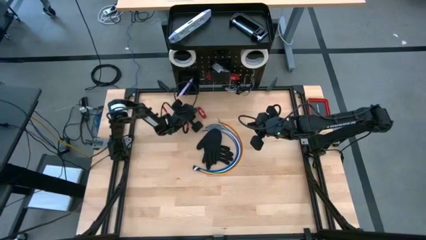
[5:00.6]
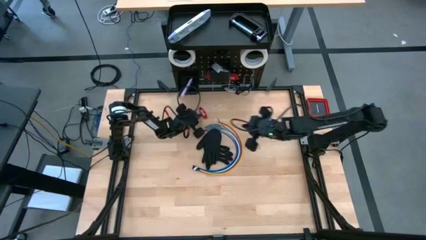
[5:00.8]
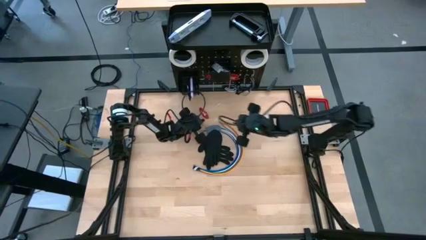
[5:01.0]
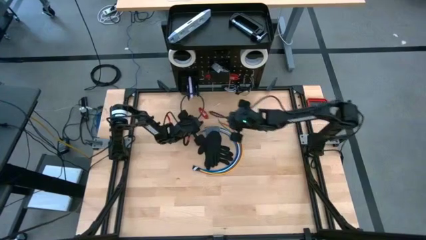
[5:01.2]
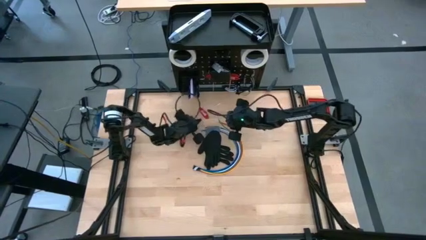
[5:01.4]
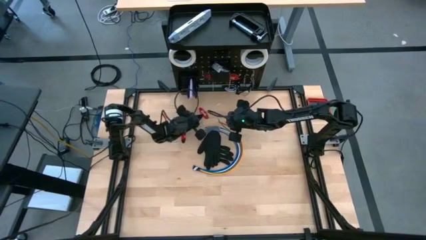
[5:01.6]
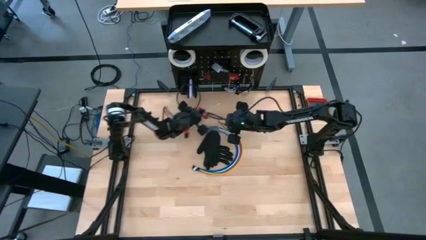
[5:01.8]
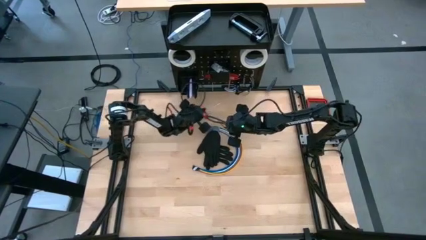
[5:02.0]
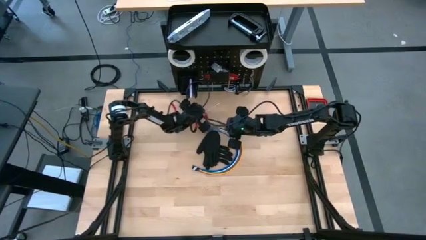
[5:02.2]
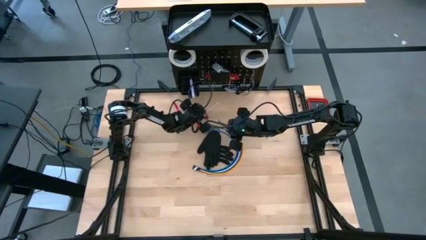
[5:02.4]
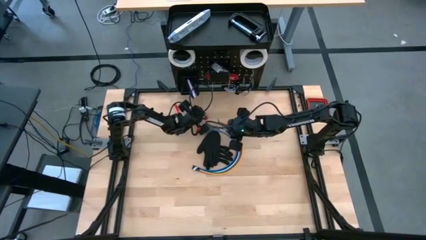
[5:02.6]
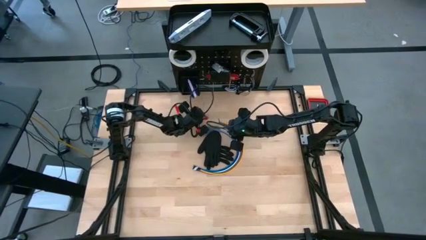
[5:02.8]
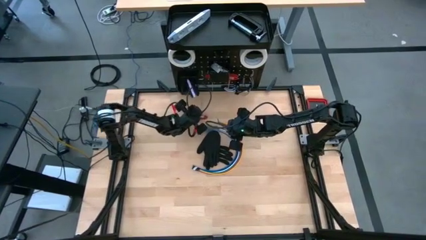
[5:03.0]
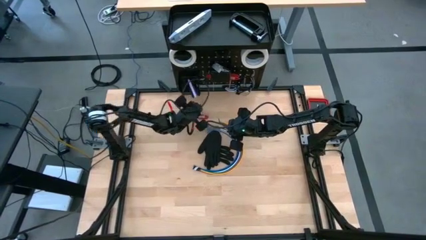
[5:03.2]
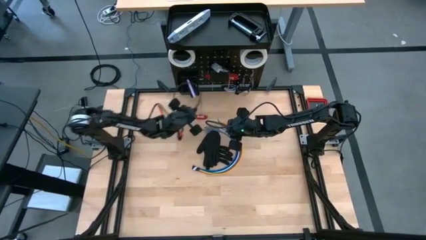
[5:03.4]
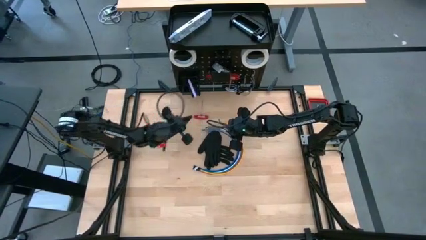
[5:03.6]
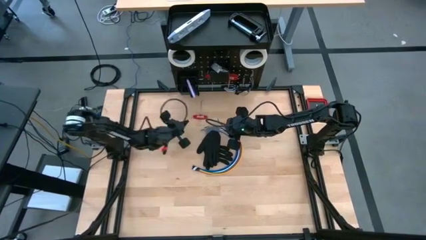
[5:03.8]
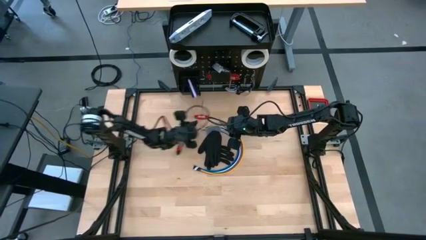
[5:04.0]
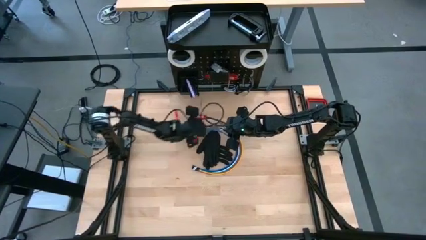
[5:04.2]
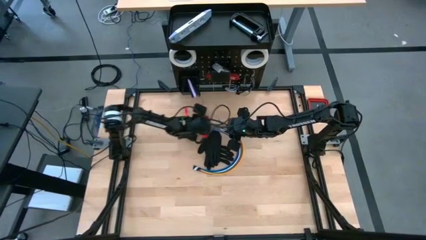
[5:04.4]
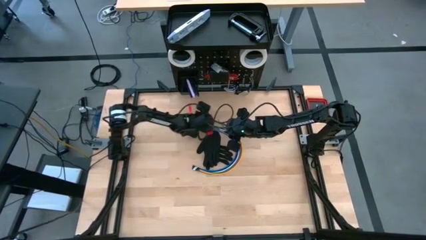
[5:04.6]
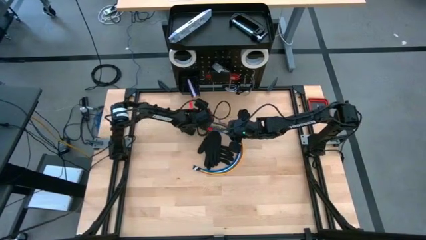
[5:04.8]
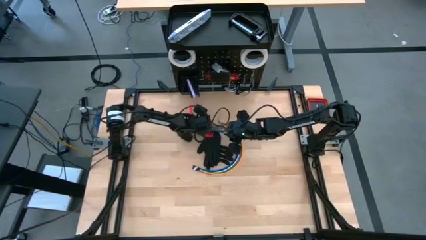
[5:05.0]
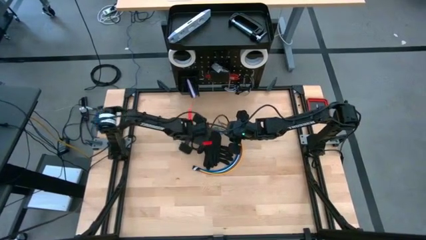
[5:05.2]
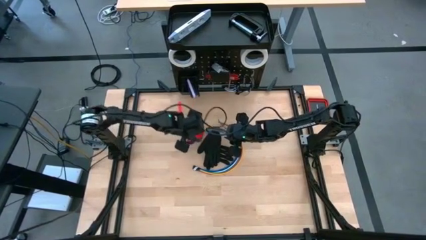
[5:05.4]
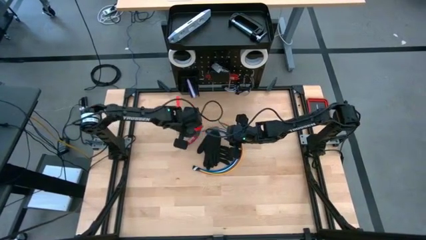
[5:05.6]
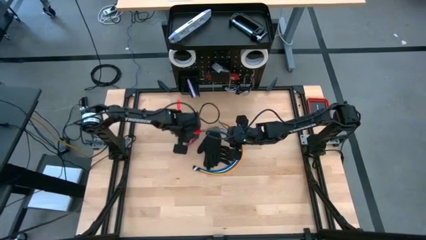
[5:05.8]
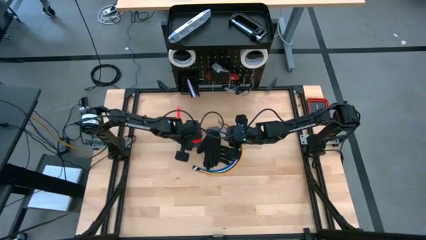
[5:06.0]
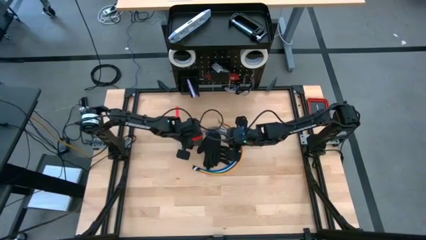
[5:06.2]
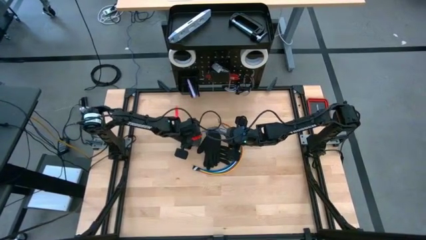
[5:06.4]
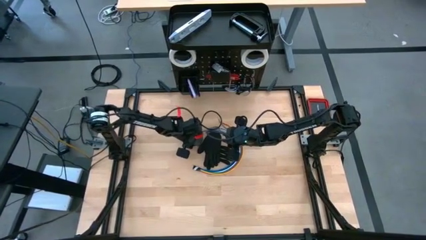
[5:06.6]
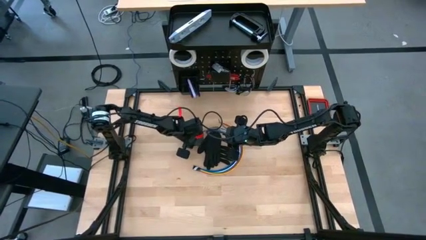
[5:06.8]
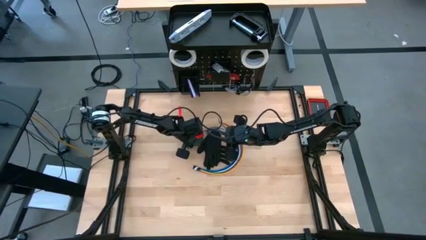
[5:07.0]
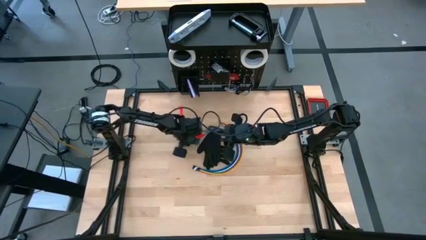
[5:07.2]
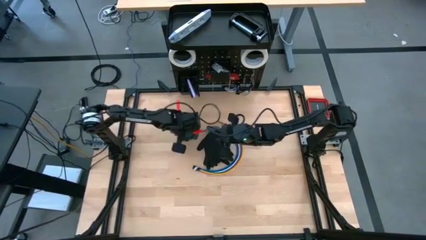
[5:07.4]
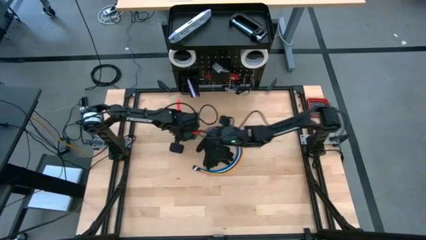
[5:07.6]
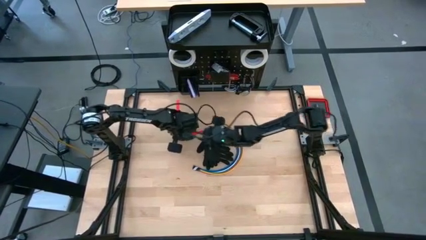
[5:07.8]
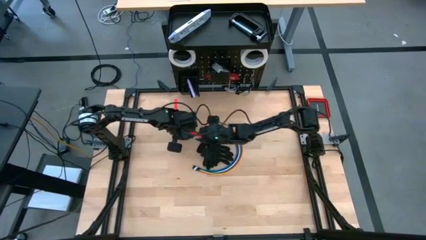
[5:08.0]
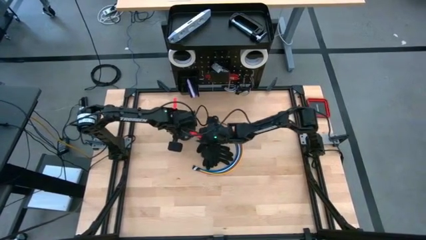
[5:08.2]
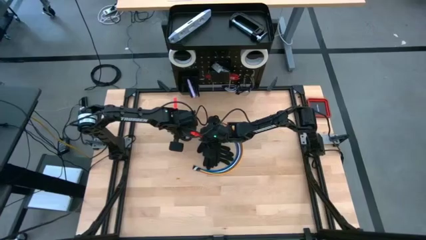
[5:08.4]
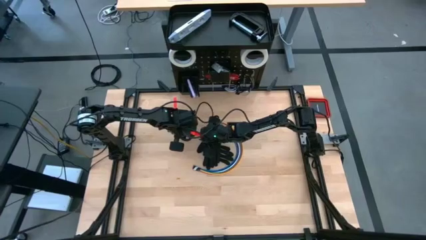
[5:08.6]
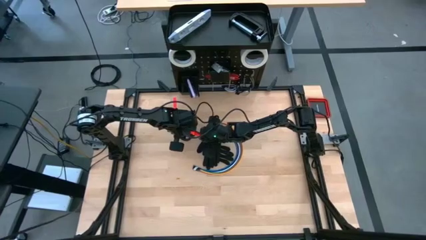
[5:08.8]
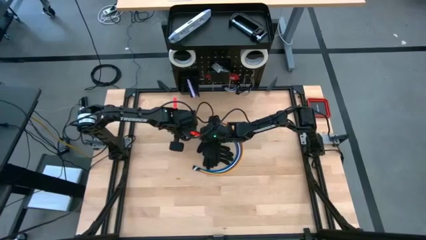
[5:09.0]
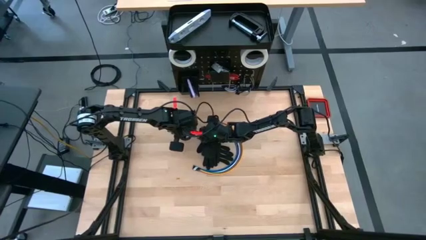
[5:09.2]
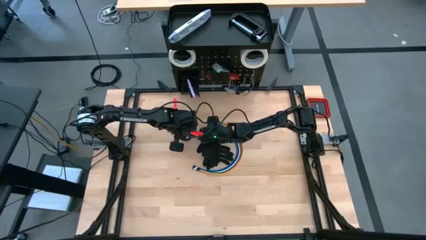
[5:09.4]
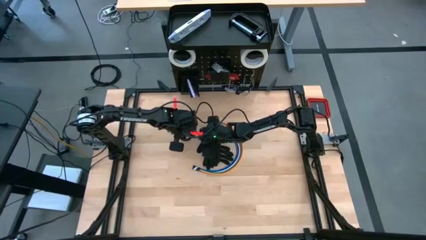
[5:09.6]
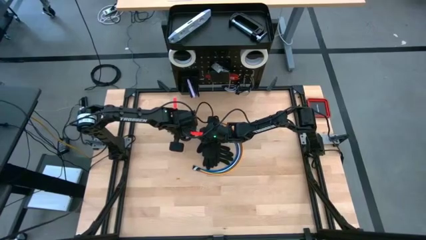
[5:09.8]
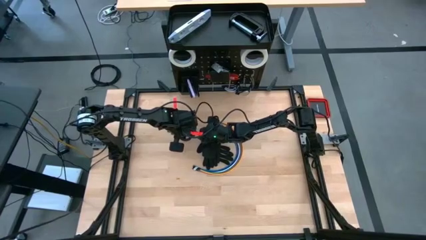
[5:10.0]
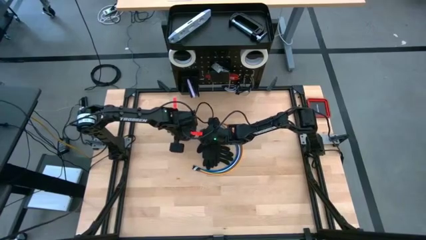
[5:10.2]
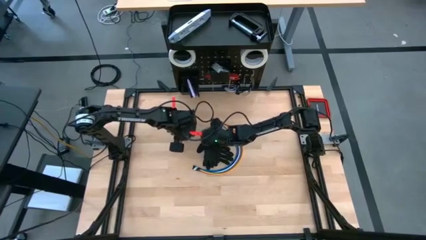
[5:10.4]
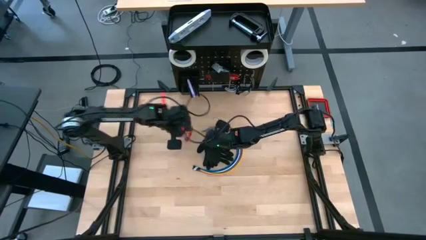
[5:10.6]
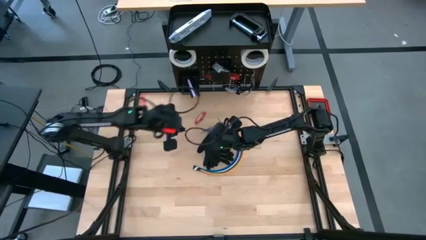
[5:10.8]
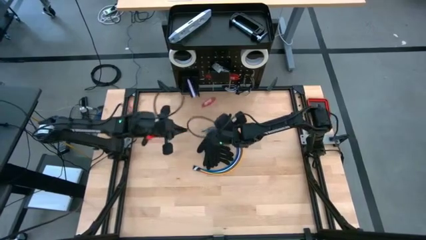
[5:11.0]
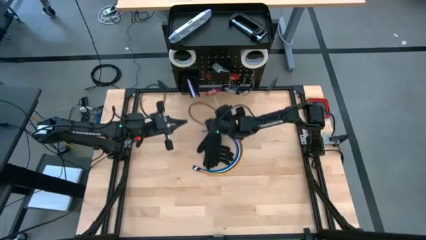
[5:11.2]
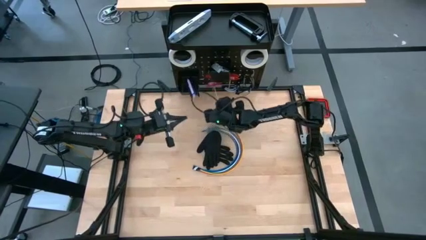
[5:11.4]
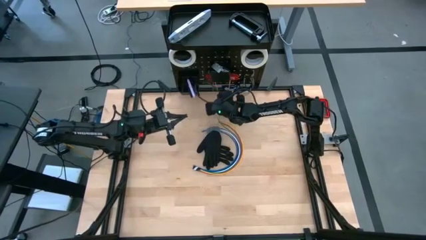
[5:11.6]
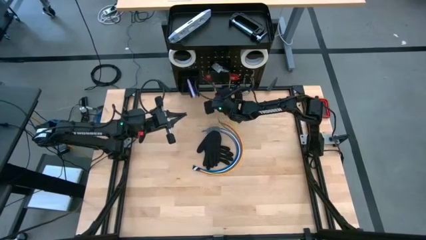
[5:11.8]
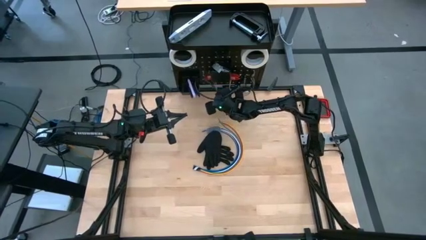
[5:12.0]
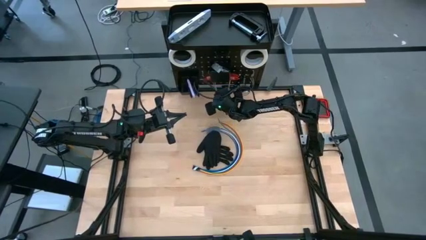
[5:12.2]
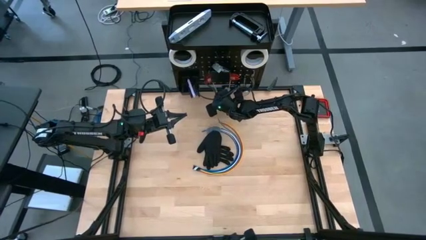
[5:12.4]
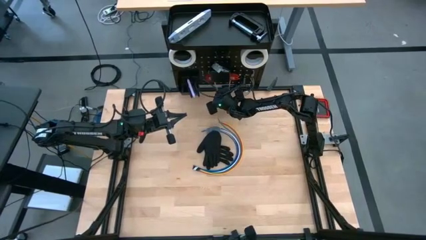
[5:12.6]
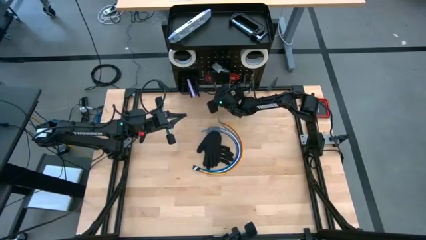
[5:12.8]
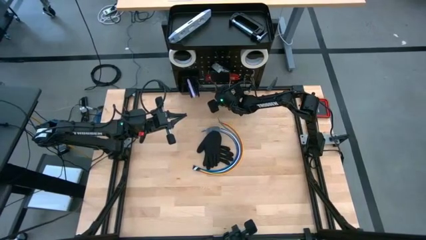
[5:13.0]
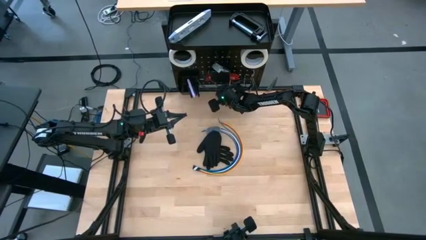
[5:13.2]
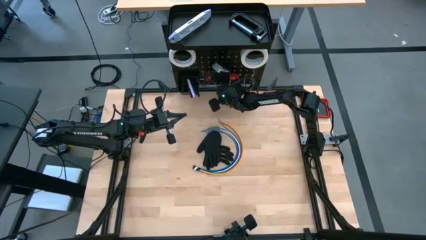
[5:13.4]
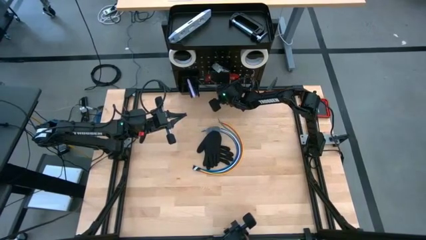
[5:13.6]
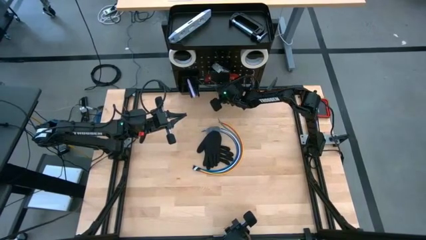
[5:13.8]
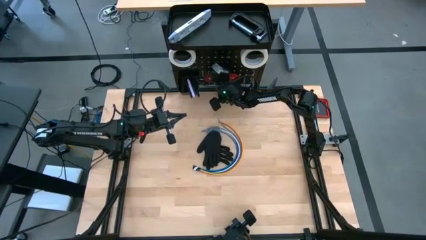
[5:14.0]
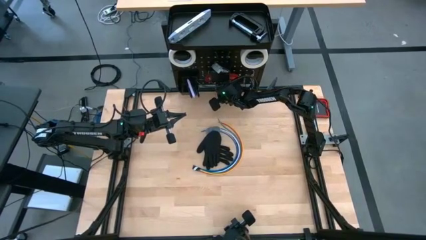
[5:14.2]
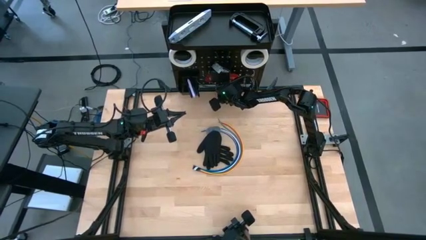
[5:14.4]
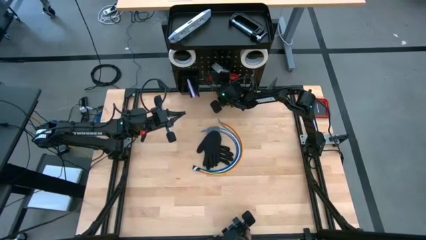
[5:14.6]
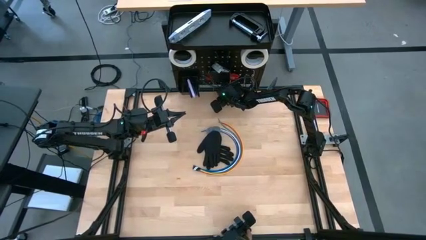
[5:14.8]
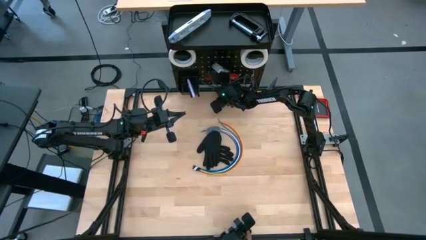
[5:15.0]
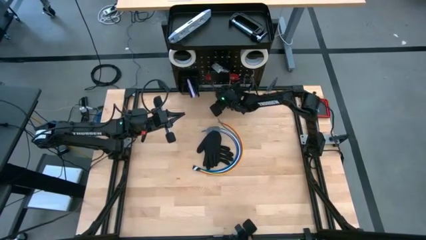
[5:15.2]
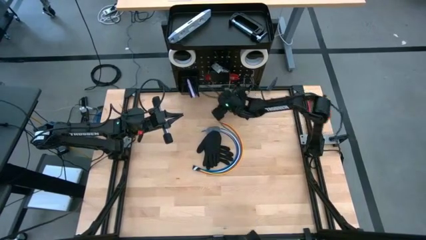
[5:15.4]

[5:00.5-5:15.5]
Task: Hang tools onto peg board
Hang the red allen wrench on the peg board

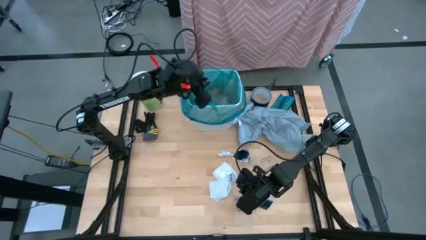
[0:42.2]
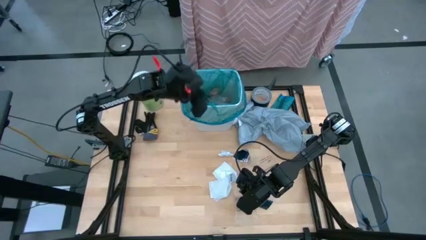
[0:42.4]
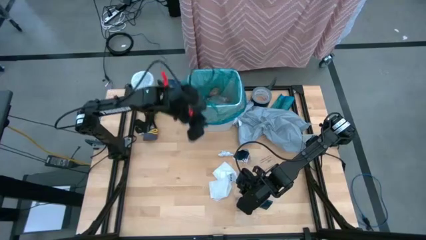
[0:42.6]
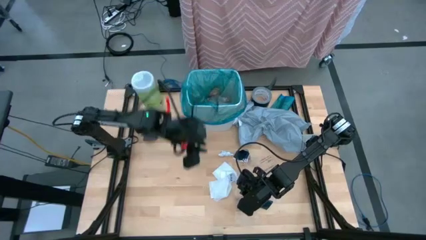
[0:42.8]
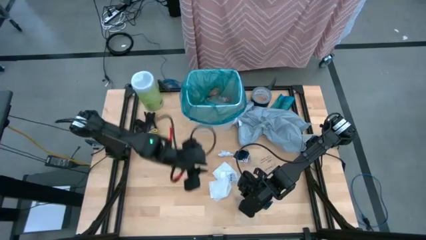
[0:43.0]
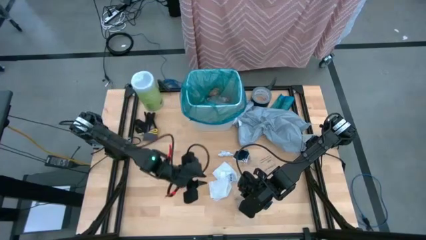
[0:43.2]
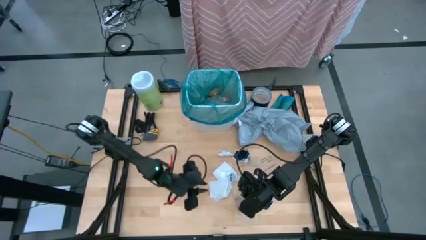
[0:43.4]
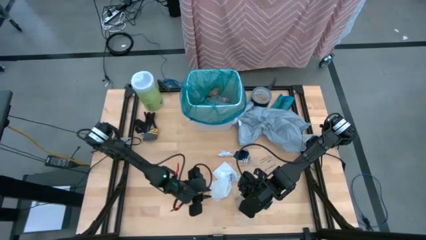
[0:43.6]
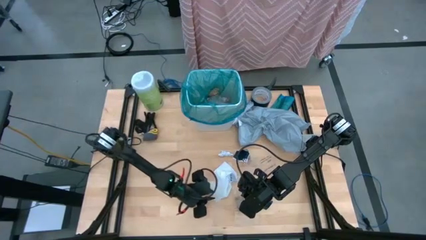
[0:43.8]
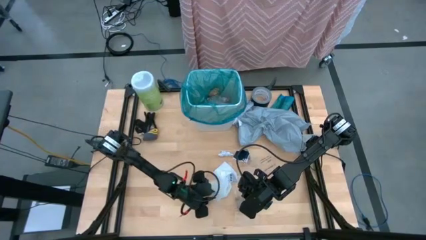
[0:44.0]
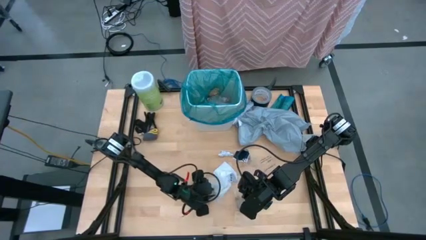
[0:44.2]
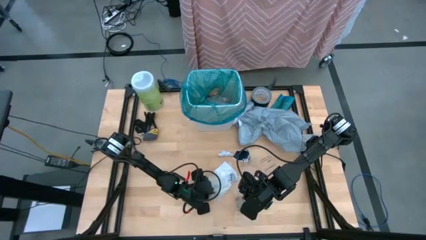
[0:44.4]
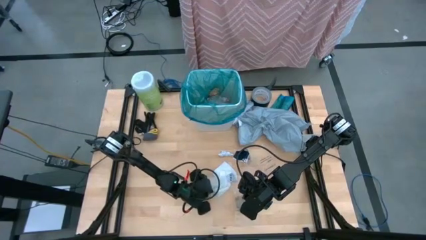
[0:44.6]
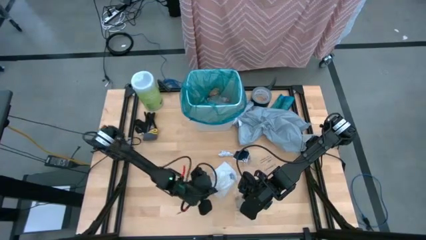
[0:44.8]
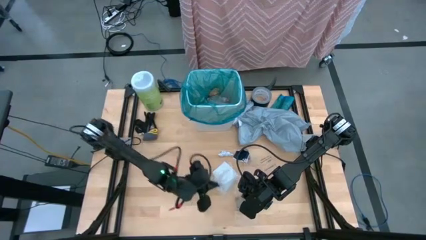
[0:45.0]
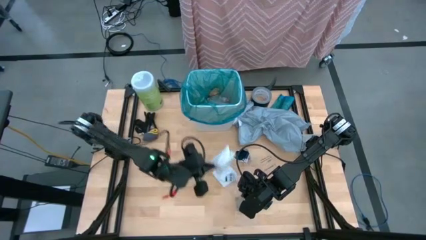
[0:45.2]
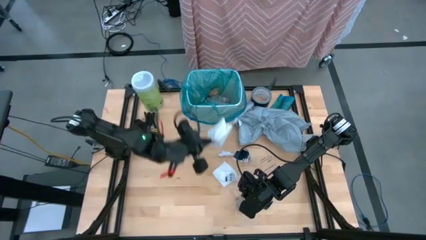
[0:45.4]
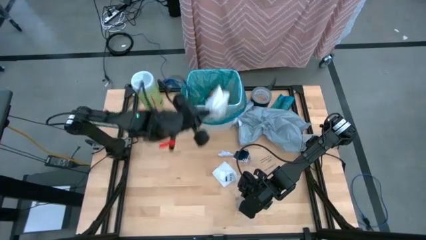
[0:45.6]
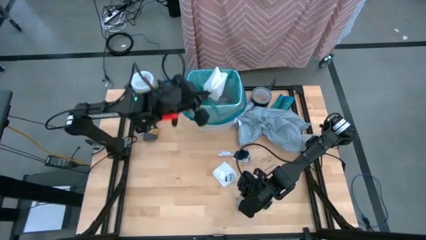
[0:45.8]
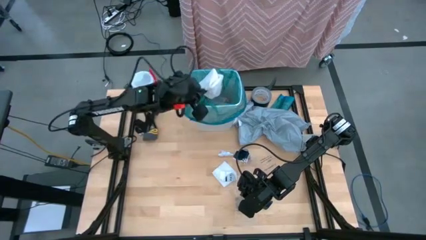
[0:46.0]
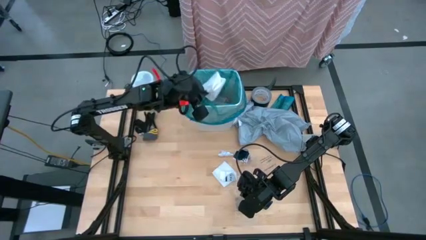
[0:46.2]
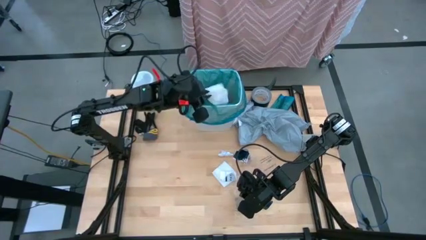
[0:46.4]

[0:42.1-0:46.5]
Task: place trash/remove bag and relplace
Put the white tissue into the trash bin
